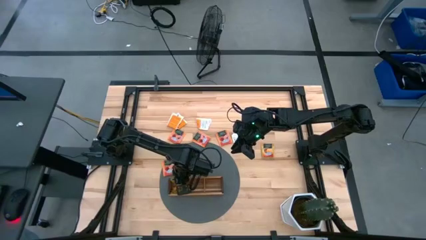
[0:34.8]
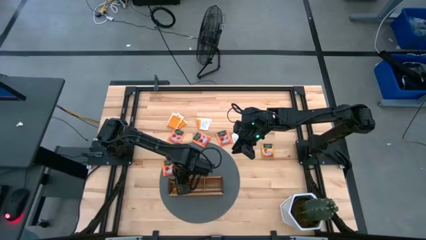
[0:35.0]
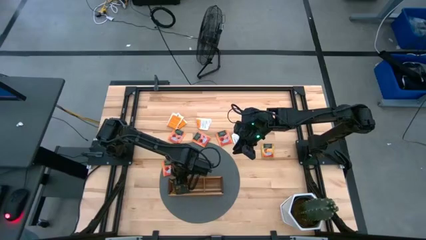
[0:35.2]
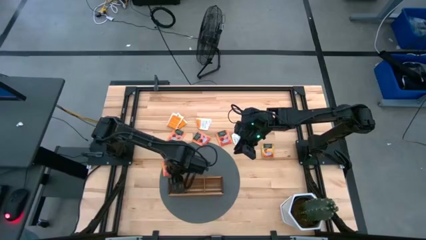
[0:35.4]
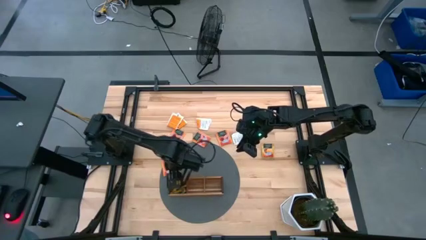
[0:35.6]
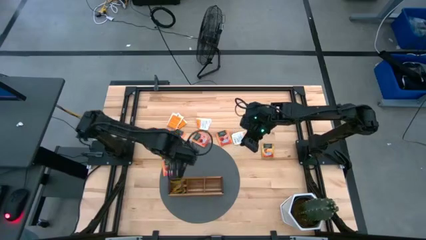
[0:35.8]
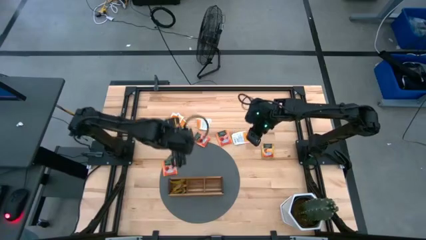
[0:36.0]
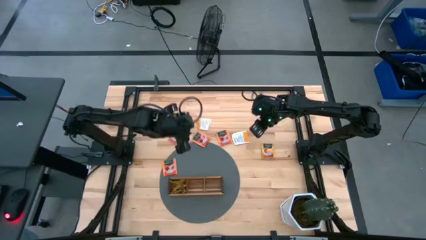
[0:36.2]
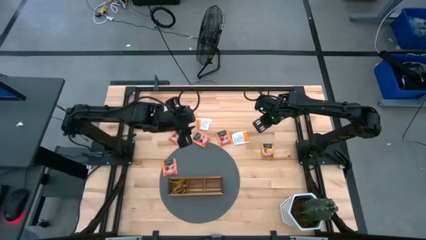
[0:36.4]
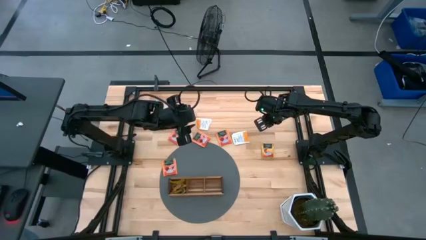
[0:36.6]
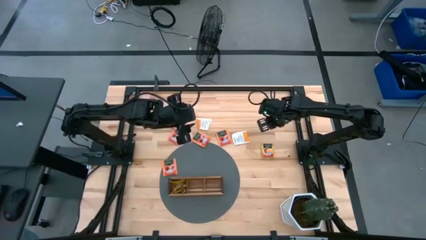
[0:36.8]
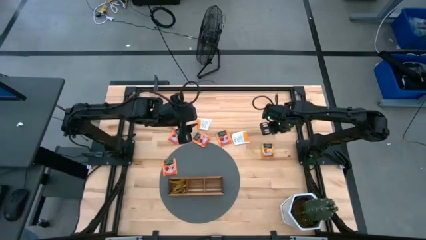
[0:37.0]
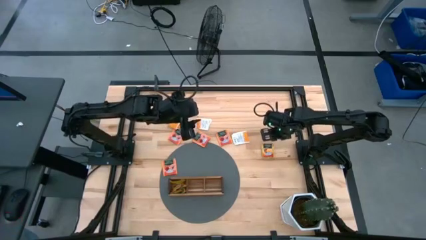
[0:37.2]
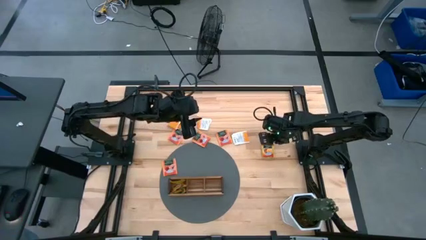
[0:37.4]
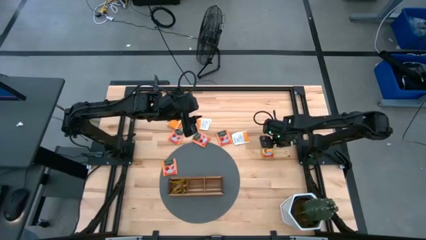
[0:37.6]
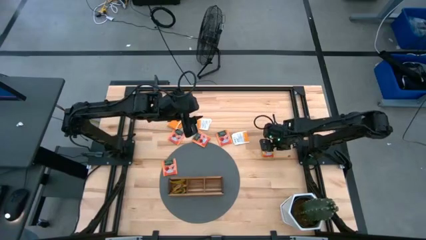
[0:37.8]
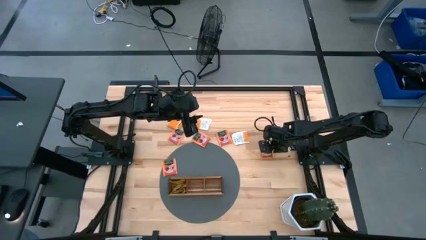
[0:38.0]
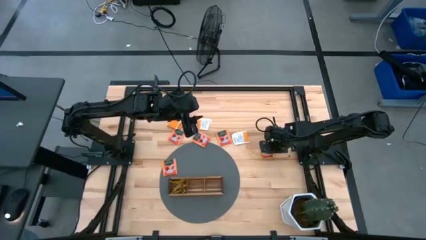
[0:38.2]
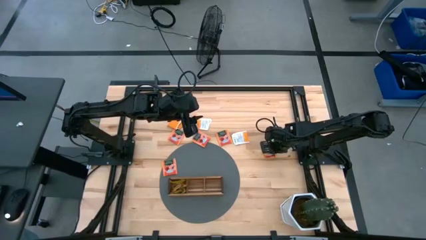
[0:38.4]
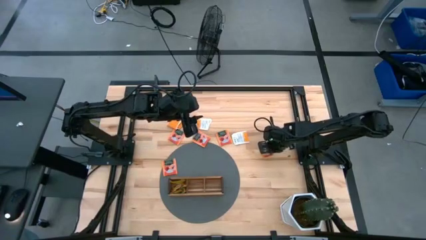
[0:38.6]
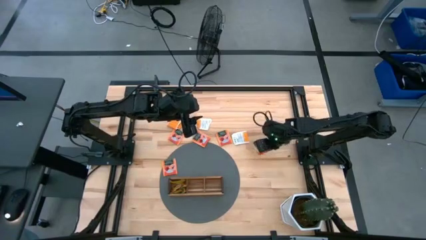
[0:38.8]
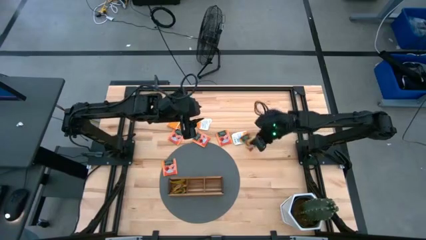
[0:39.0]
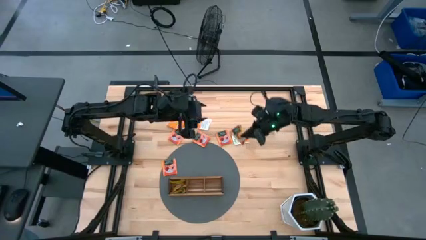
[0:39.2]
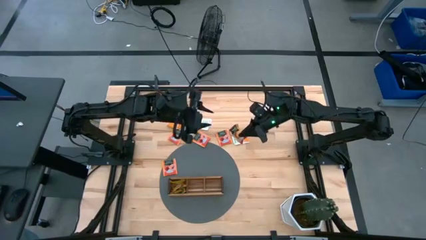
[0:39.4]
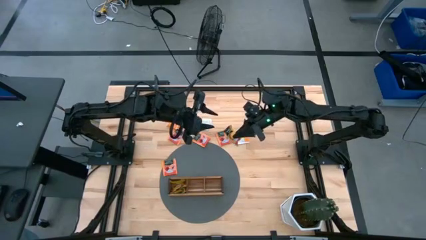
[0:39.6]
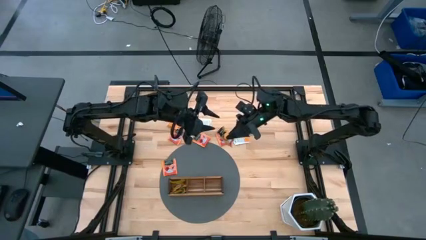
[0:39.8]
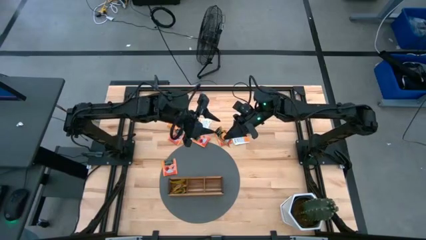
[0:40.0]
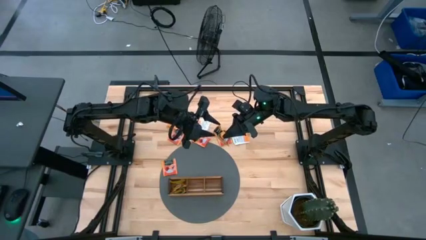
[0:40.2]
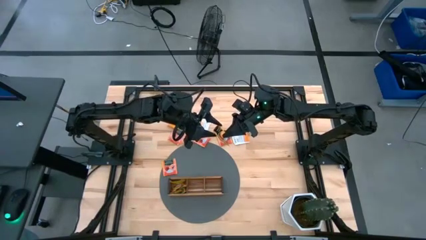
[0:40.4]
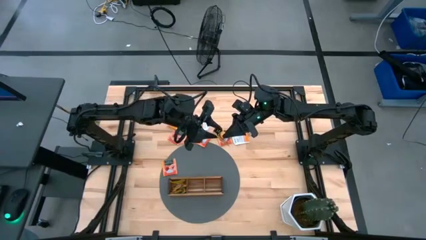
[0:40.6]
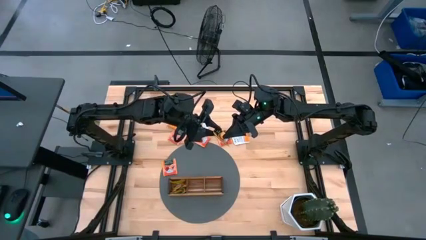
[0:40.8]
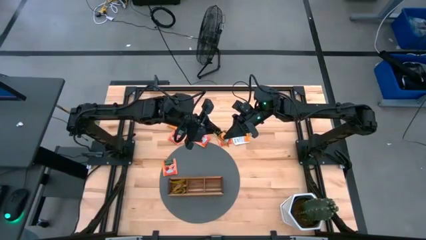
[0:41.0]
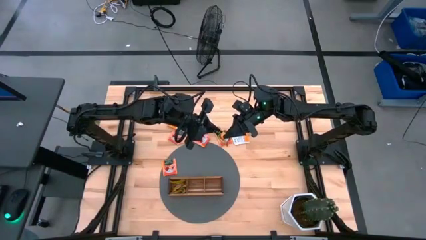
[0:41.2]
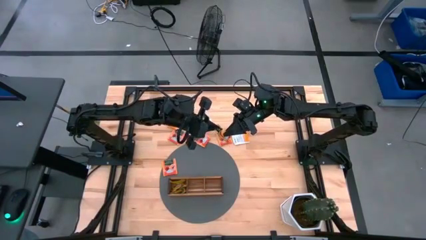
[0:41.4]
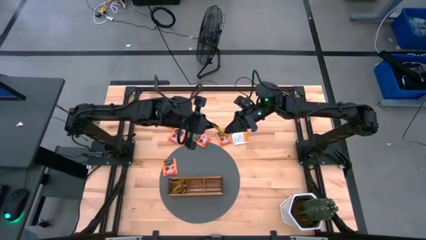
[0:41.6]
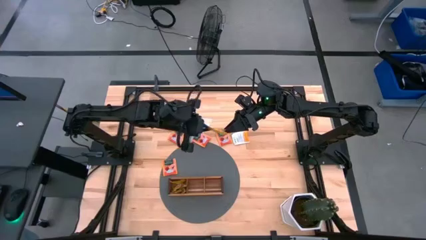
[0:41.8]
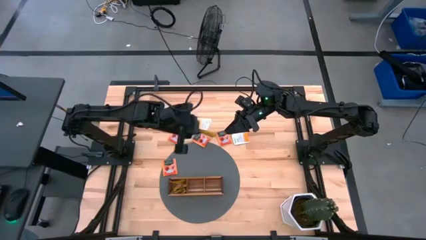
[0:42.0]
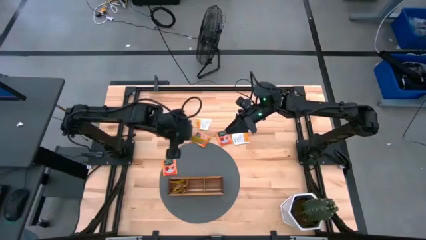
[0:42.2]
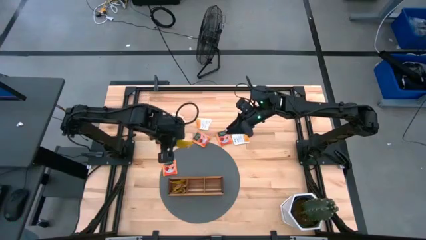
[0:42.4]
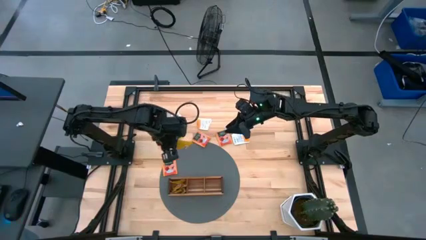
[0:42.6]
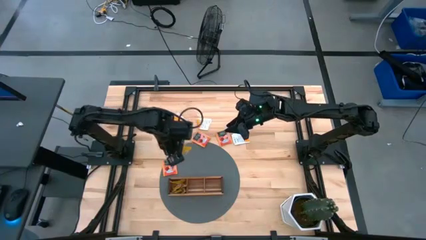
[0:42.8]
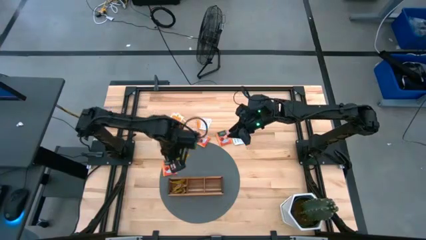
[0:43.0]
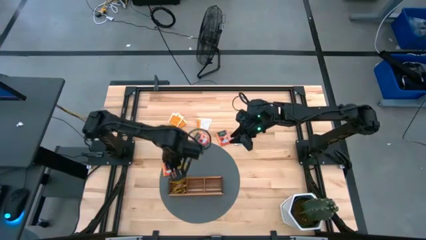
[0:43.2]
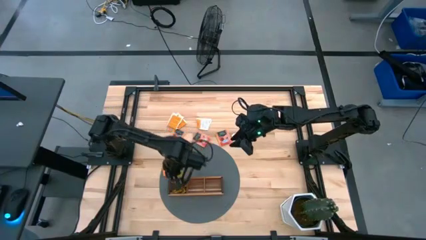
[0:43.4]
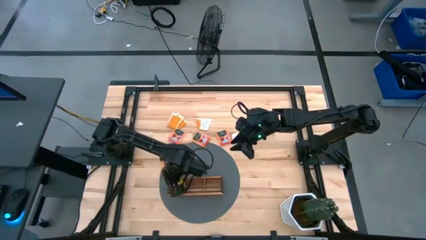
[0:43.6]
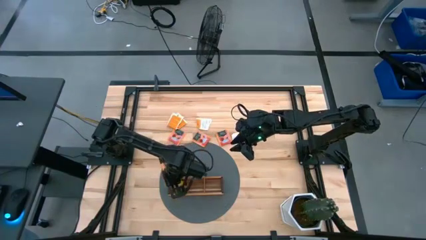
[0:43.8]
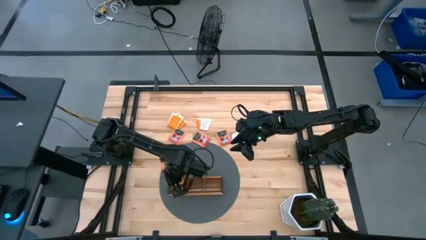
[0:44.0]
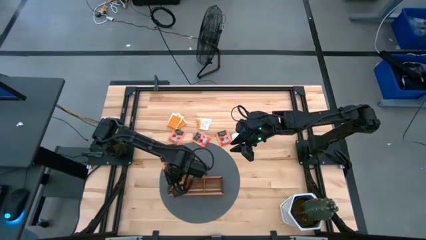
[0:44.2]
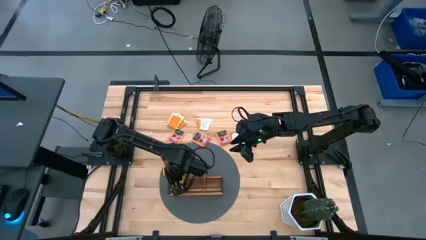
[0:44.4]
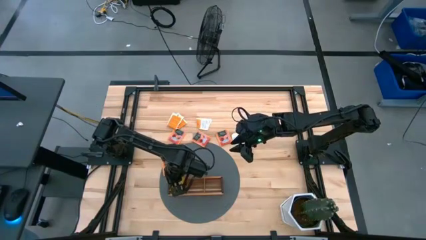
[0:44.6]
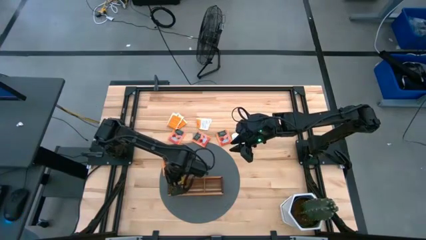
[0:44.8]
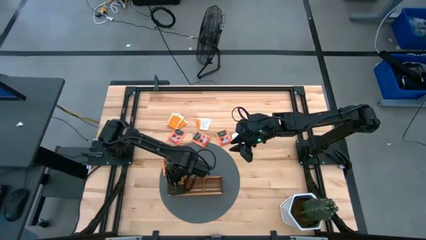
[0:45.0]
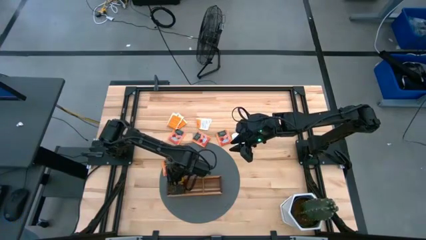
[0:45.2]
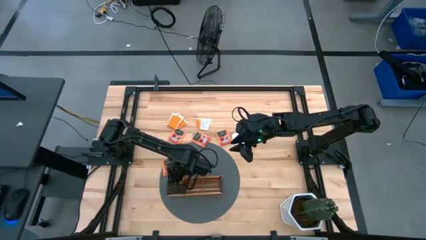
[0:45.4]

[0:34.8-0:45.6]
Task: Pick & Place Tea
Put the yellow tea bag into the left section of the wooden organizer
